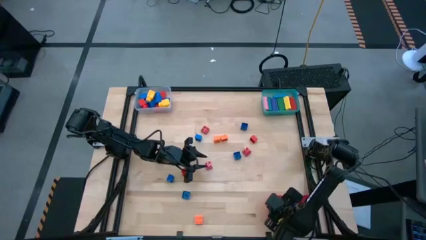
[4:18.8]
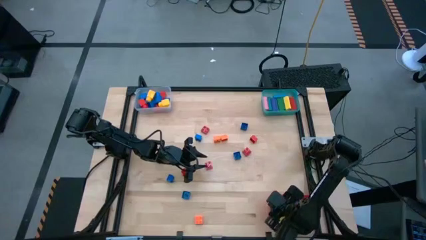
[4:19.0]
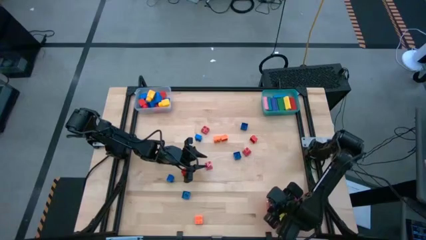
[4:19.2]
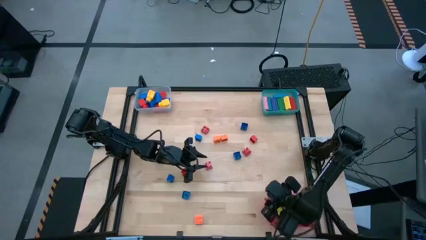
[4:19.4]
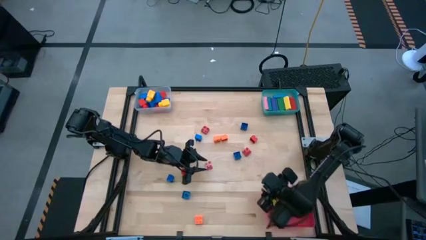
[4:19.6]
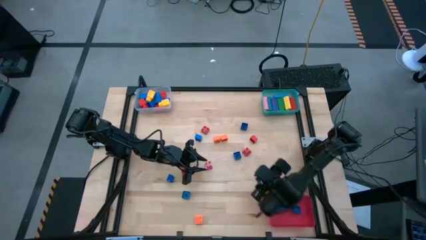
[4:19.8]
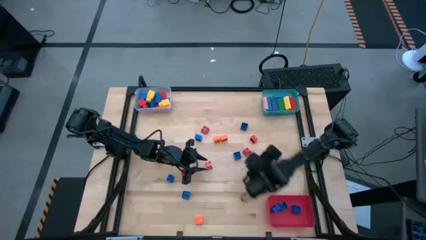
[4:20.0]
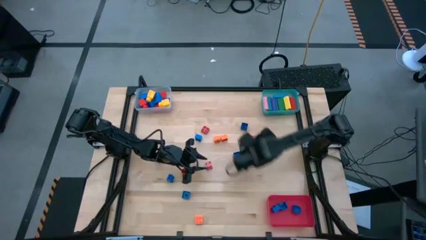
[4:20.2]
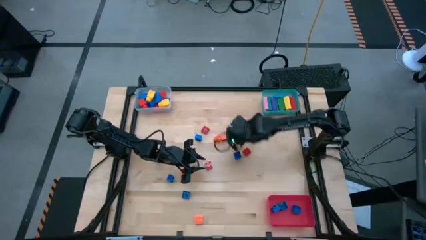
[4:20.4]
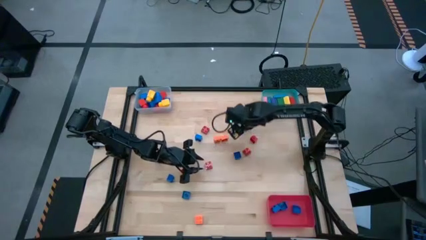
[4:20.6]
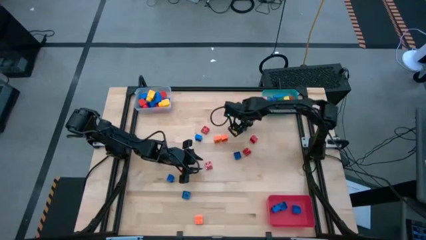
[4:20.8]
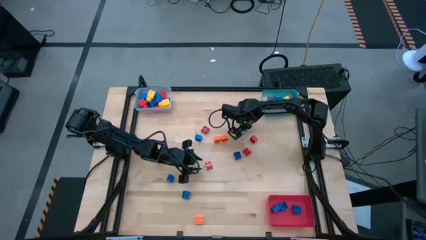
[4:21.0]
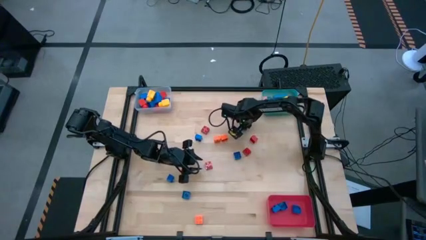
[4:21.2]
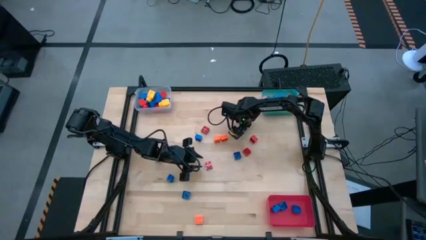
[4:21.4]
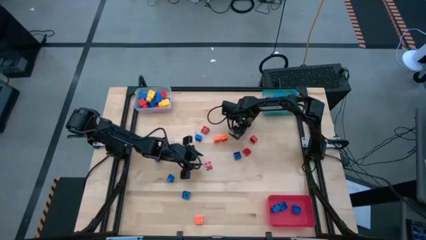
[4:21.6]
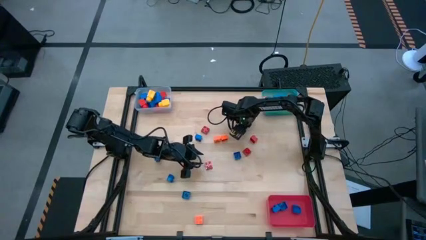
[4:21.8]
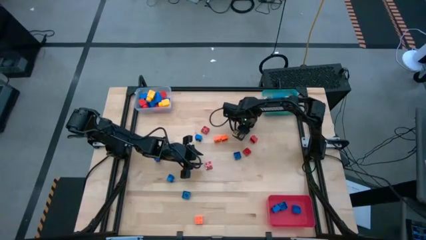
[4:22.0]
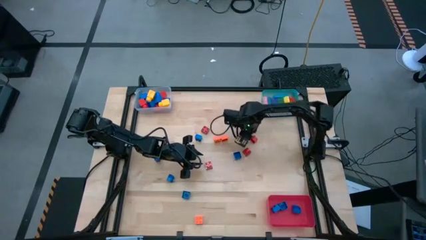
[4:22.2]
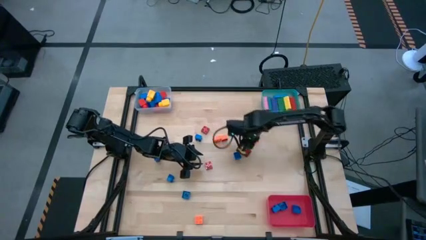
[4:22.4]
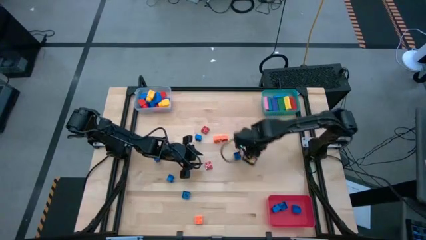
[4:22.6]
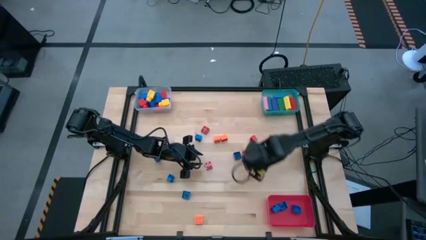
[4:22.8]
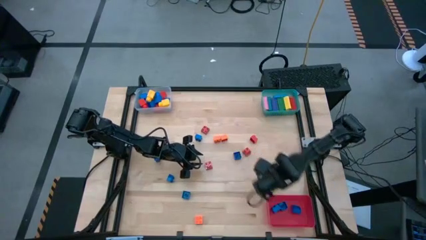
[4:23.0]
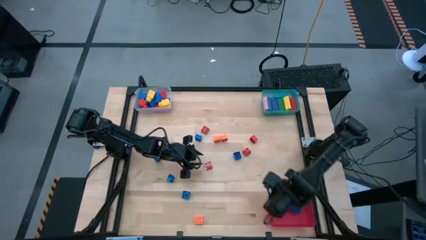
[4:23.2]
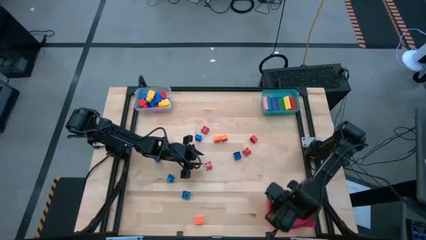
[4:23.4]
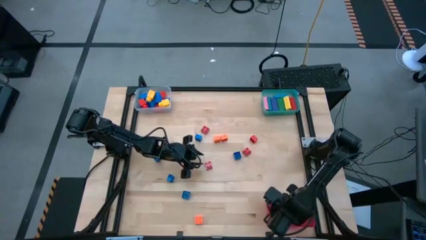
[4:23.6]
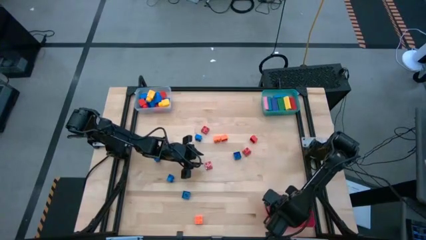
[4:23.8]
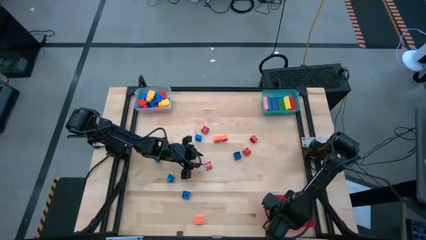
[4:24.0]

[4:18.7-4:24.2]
Task: Sort blocks by size
Put the small blue game piece into the red bin

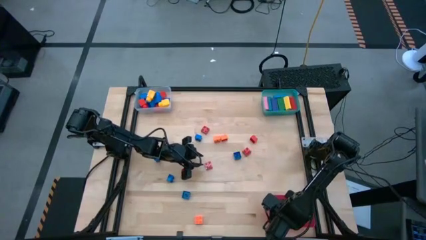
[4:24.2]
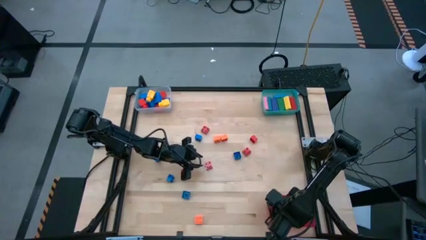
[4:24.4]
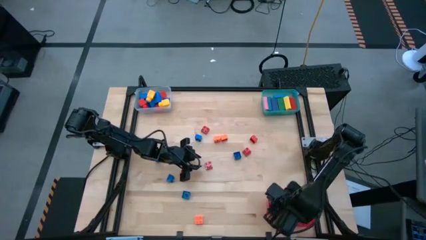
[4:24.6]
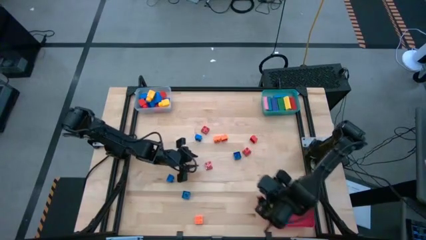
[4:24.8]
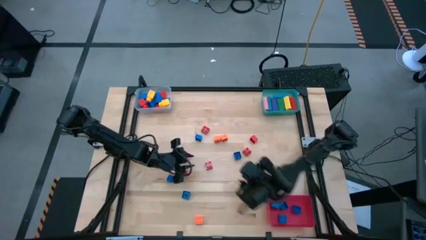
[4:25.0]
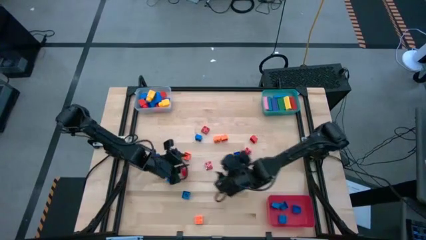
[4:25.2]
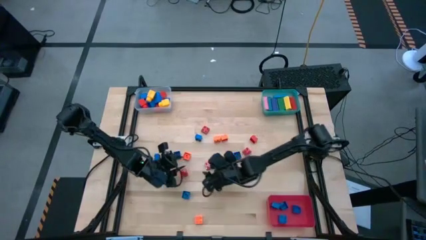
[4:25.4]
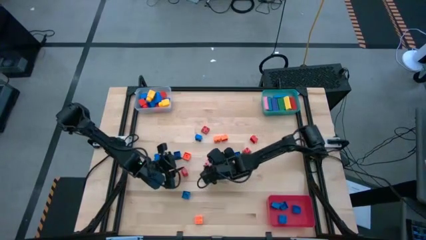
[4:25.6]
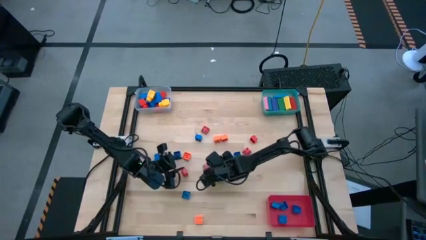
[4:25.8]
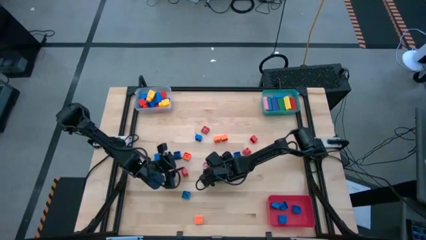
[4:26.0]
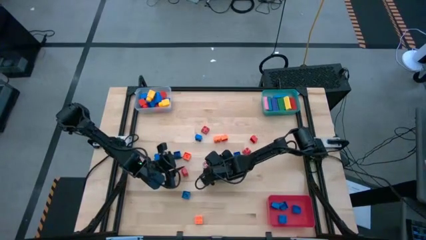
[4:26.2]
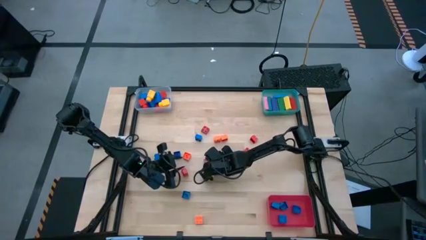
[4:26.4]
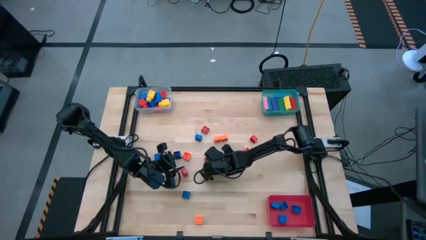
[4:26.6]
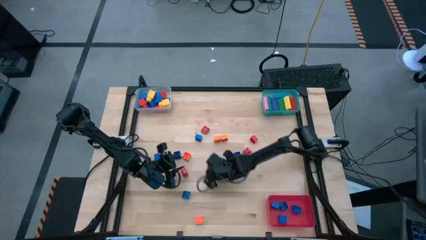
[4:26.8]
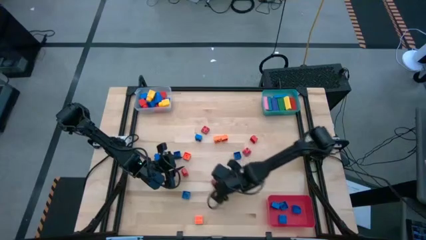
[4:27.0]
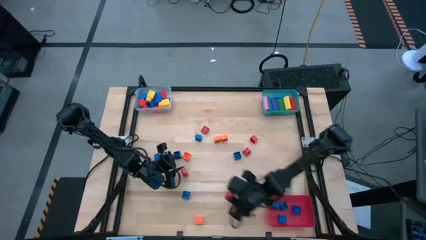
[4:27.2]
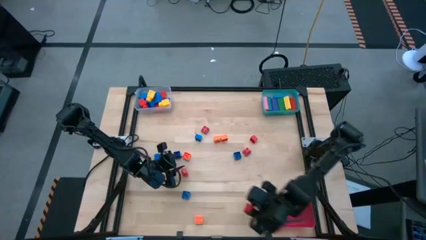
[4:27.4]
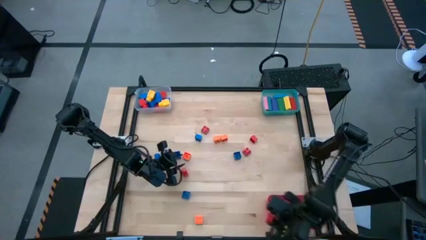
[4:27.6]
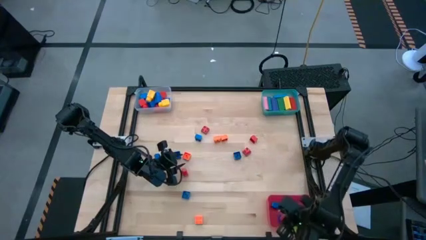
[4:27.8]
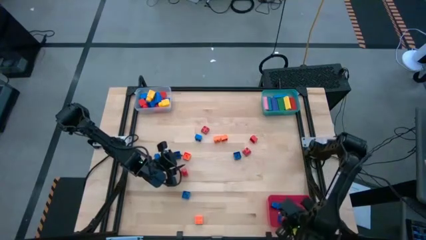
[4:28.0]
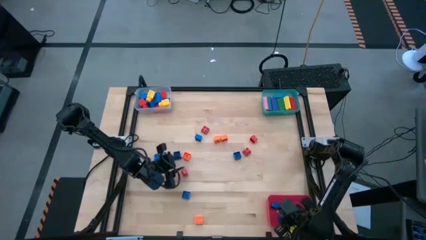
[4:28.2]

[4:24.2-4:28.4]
Put the small red game piece into the red bin

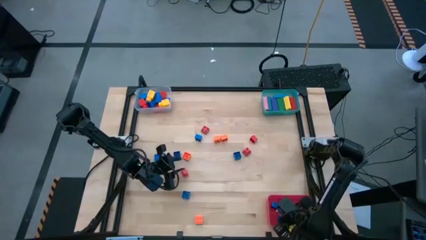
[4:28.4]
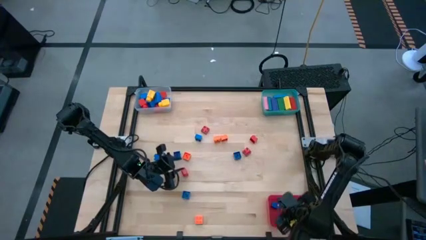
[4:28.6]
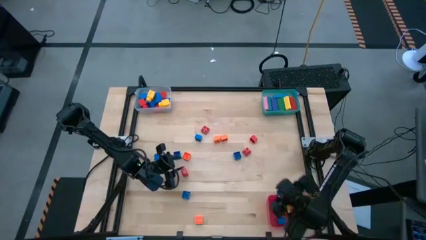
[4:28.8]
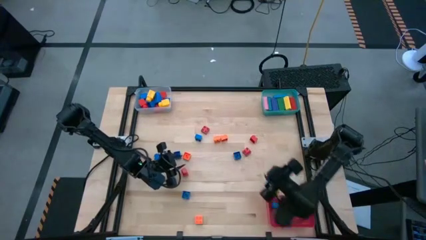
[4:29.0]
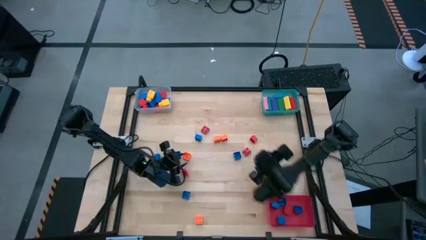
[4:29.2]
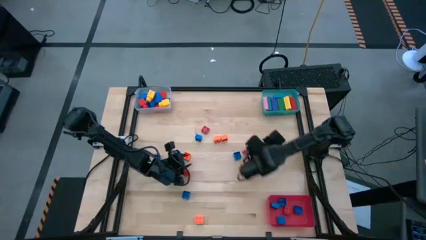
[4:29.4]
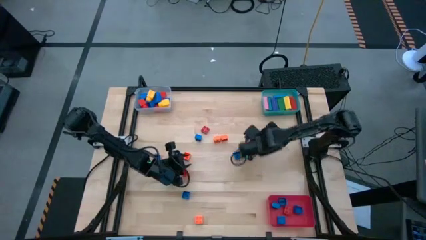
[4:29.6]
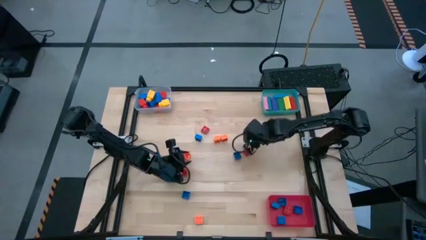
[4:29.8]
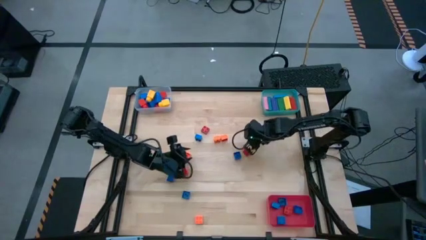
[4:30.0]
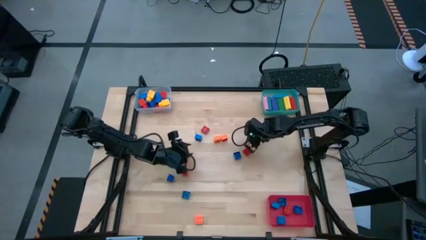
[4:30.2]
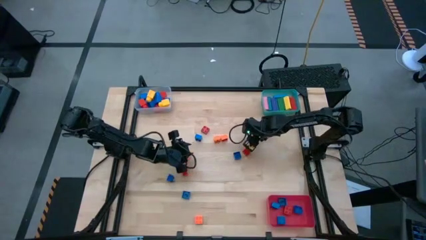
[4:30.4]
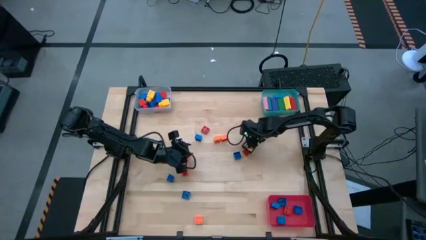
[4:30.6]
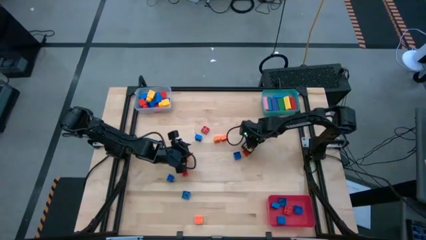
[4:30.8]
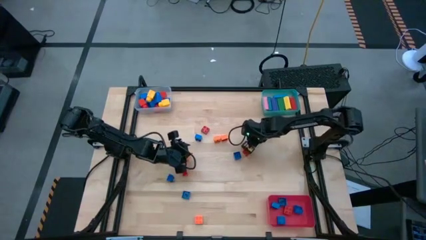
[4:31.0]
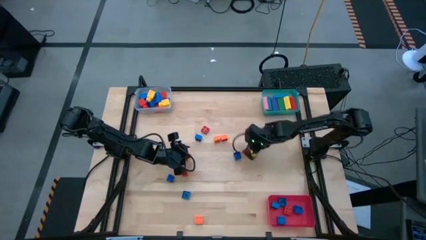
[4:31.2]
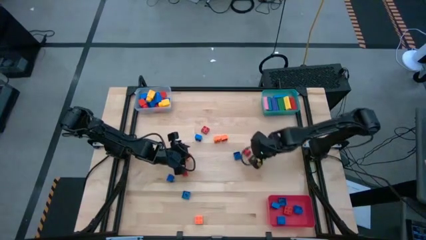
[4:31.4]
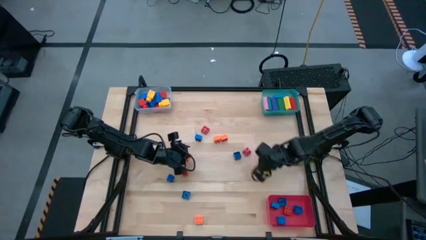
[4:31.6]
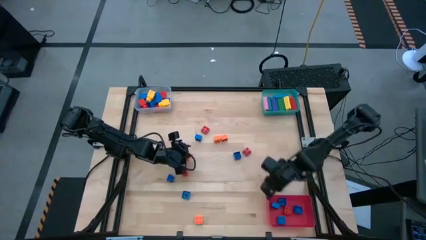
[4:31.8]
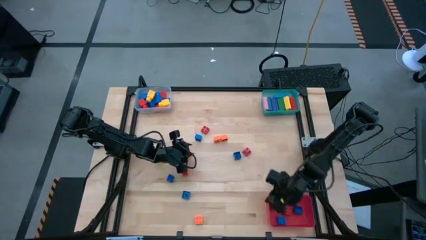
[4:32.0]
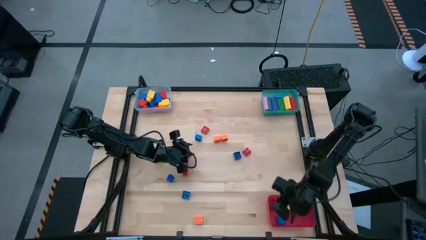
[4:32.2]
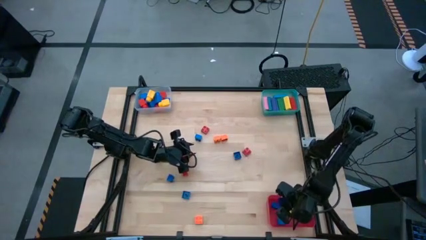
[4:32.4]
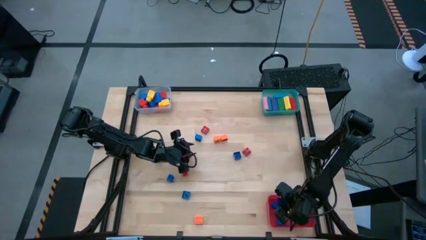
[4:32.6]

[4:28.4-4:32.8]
Put the small red game piece into the red bin

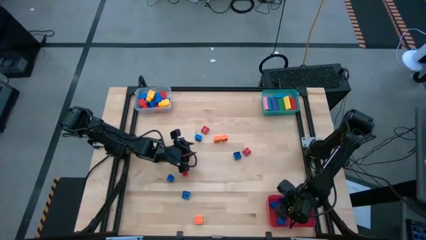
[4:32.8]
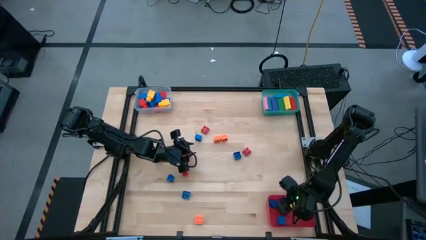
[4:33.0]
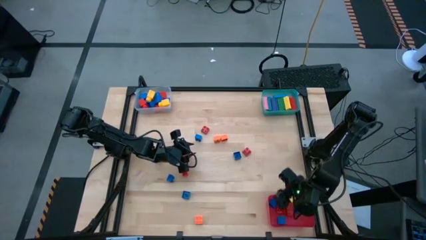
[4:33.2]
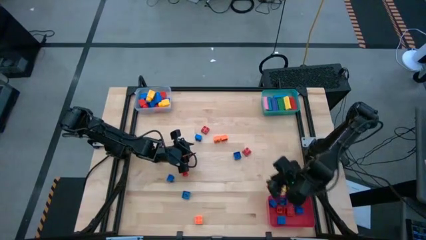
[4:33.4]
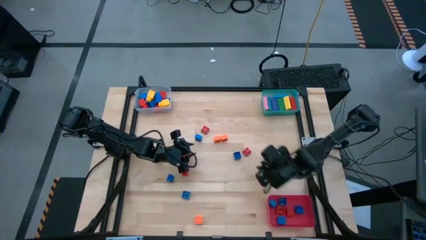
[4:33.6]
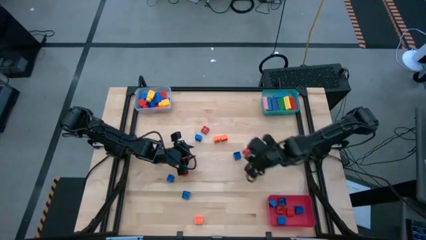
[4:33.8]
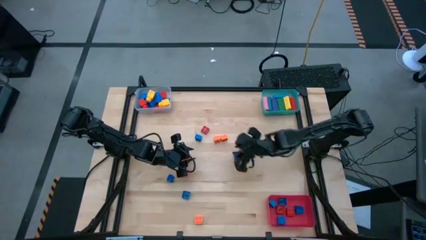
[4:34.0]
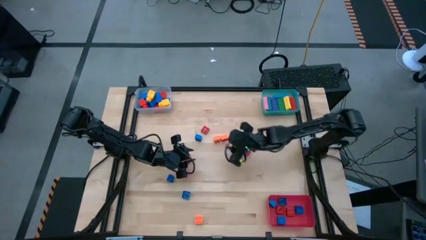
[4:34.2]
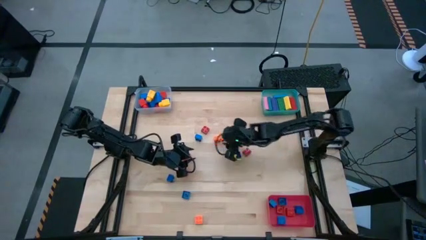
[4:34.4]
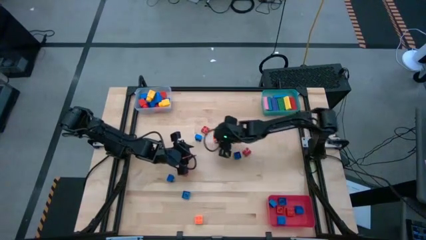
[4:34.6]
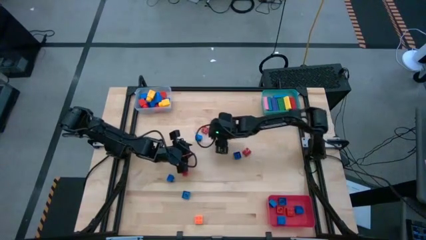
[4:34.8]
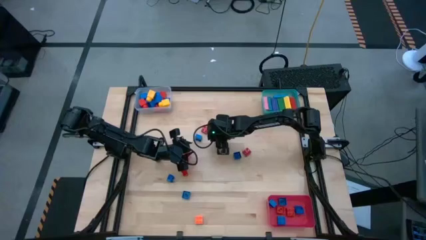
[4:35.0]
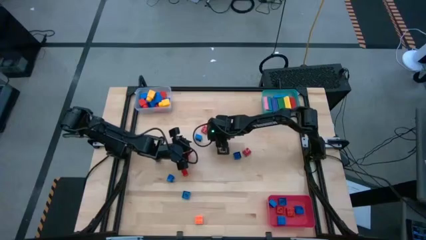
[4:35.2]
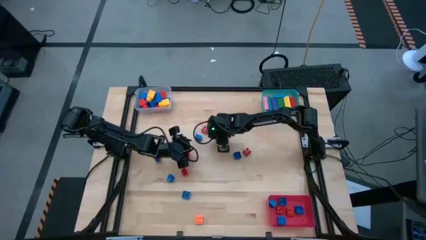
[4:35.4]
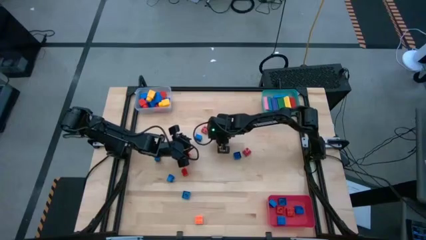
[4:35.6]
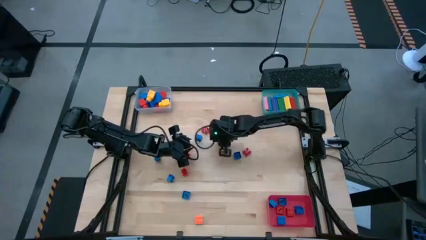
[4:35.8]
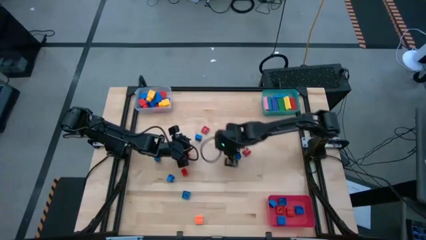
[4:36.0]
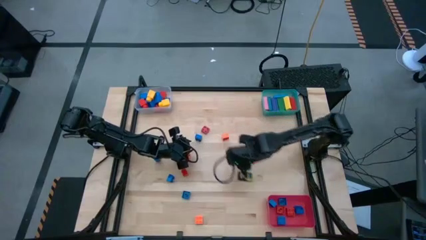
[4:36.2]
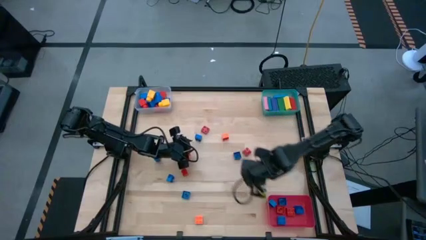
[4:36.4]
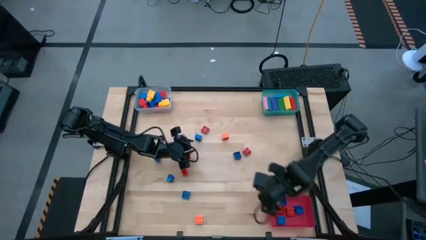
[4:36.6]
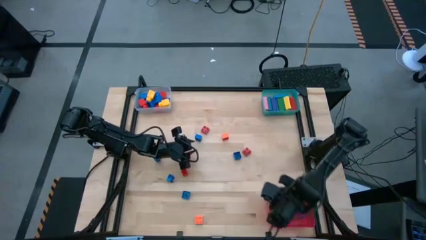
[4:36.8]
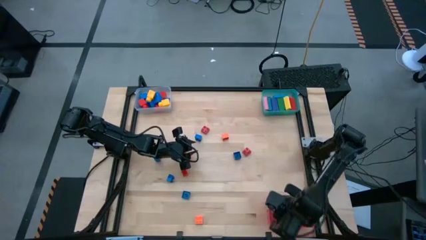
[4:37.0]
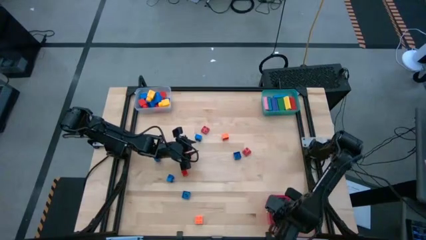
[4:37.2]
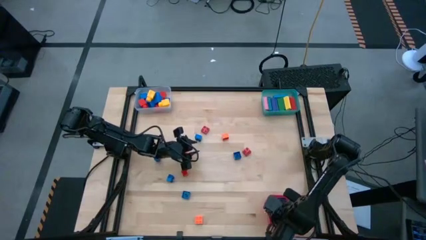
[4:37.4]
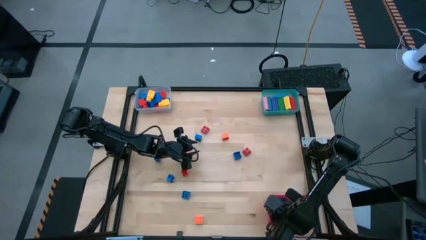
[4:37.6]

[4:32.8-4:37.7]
Put the small orange game piece into the red bin
